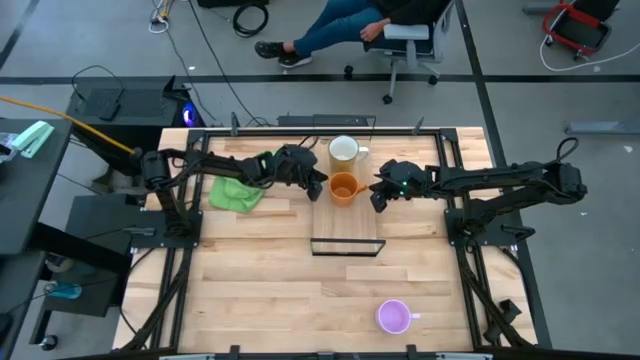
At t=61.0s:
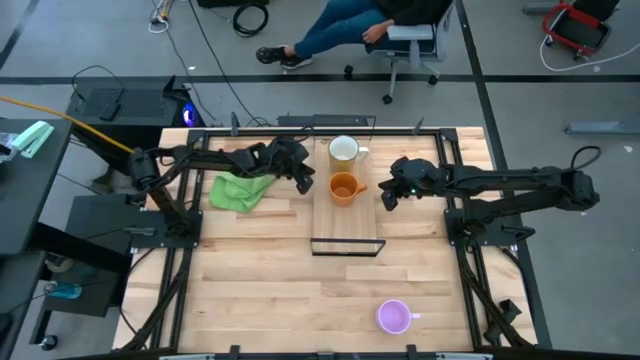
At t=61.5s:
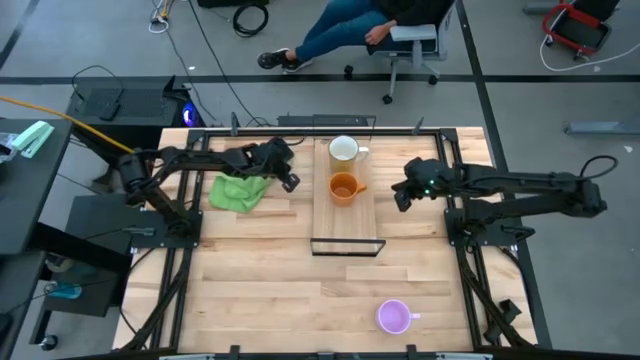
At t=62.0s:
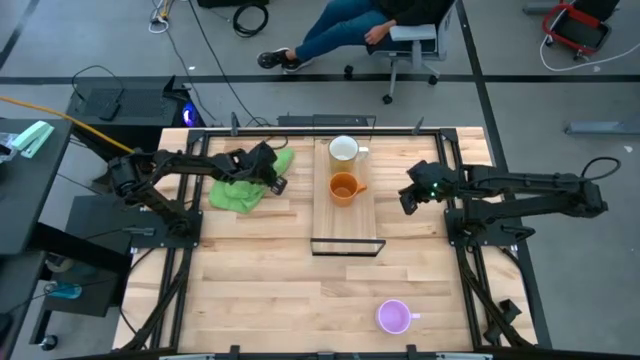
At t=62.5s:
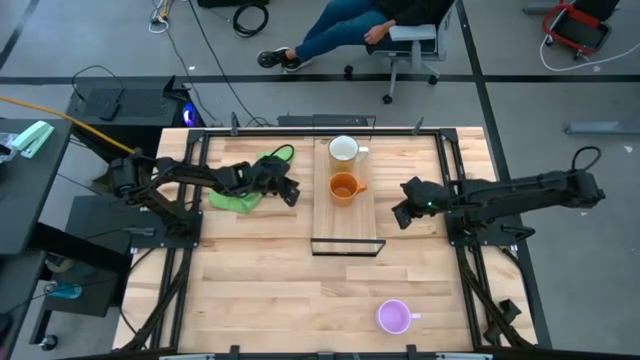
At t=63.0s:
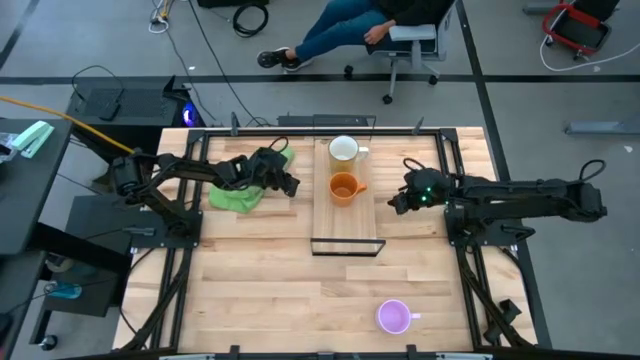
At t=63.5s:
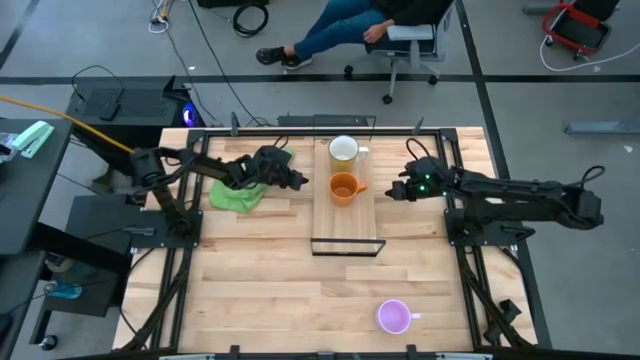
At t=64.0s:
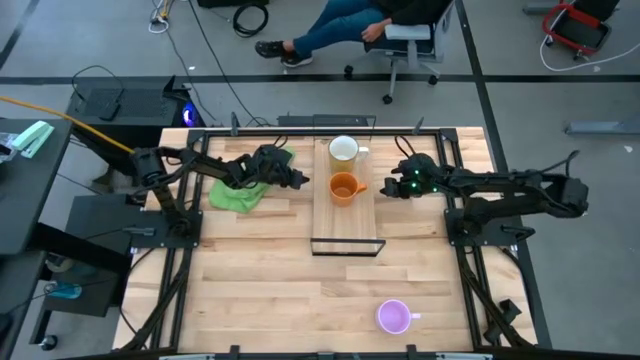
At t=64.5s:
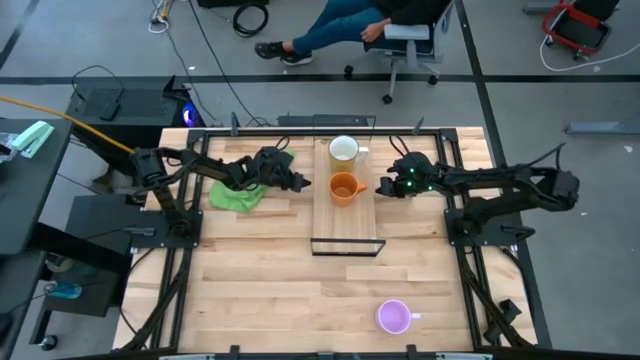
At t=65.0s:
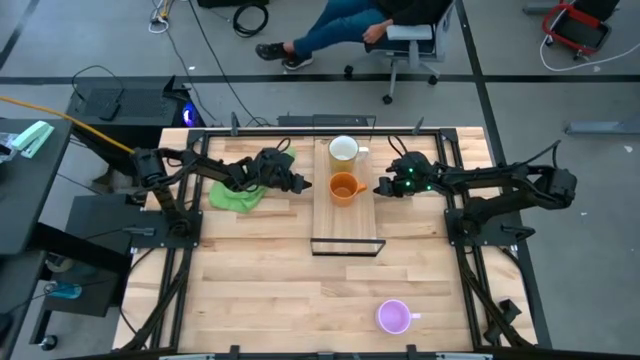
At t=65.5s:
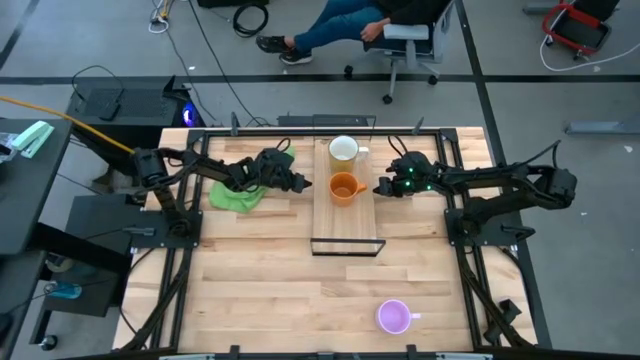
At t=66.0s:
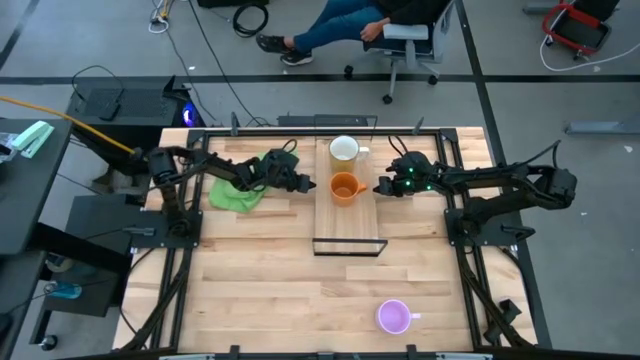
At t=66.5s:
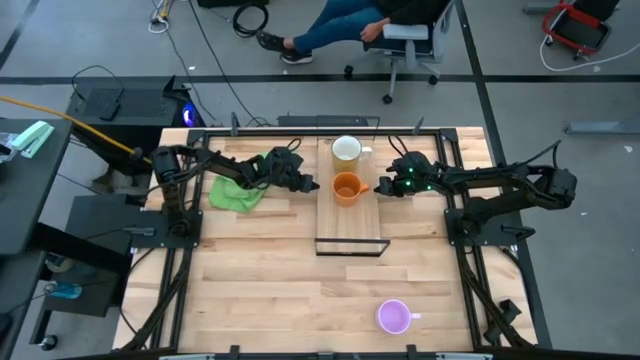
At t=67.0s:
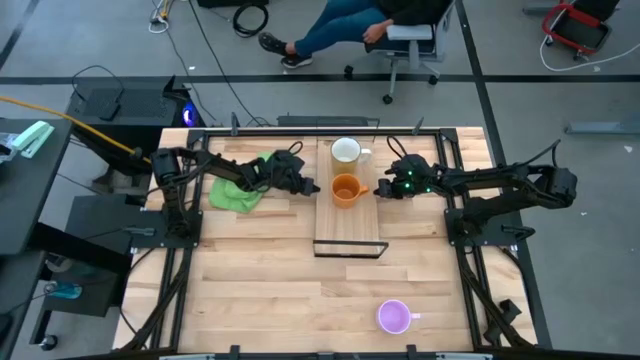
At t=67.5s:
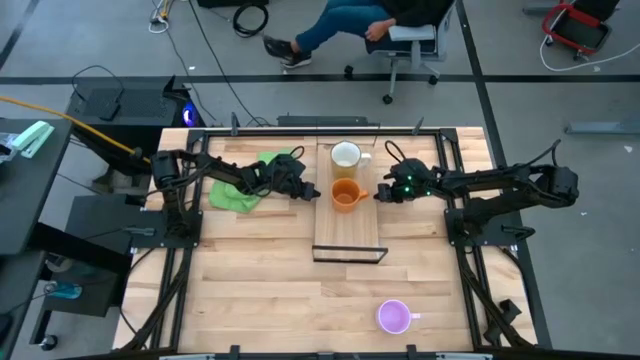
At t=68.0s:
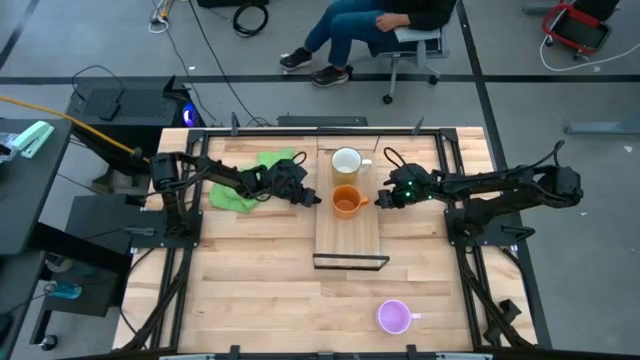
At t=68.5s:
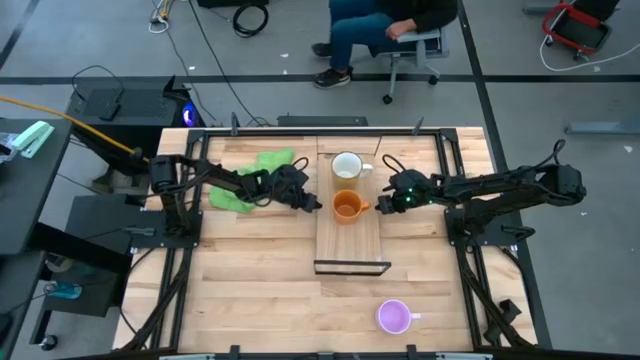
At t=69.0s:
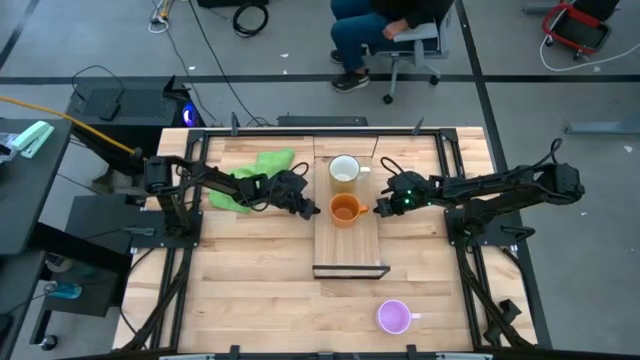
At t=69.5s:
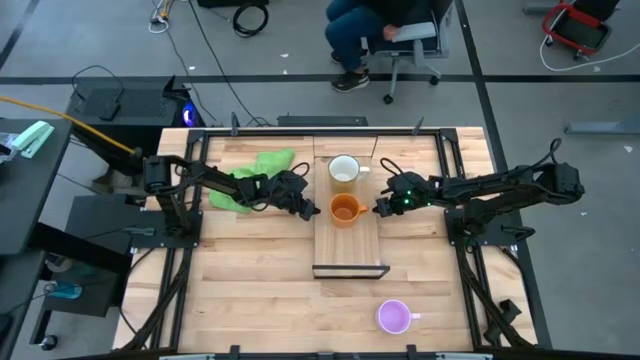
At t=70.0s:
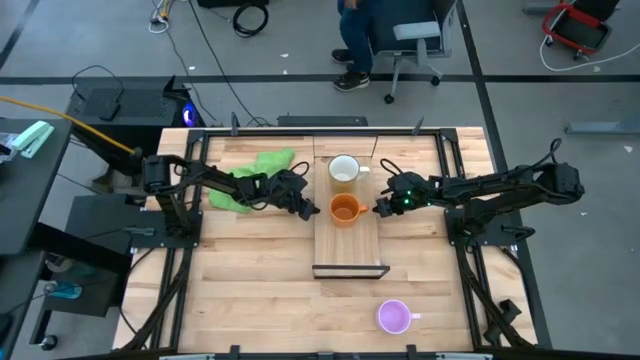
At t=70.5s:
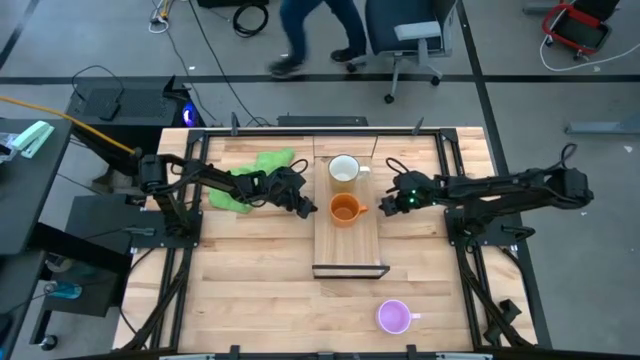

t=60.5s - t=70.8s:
Task: Stack small to large cups/mugs on shelf
Adjust the shelf

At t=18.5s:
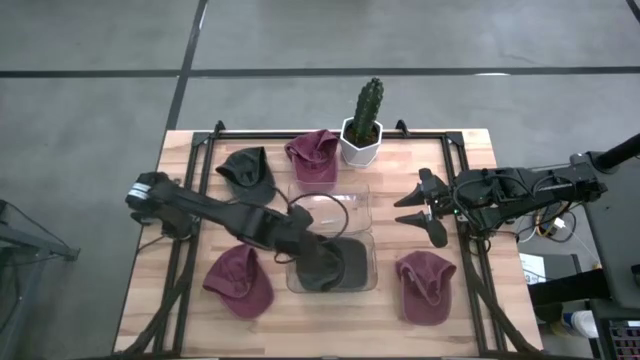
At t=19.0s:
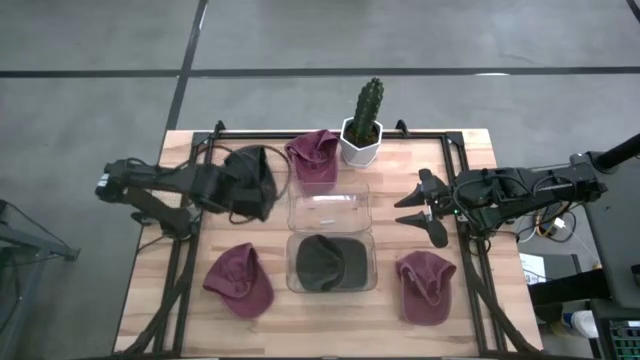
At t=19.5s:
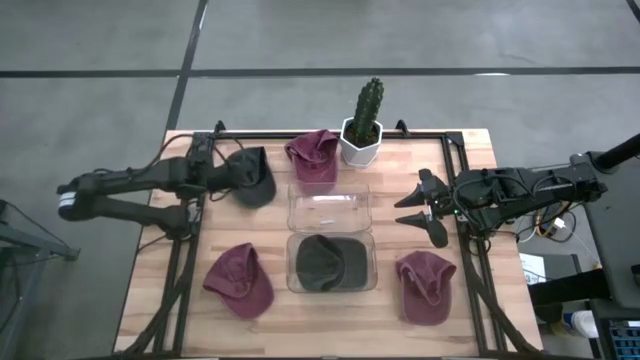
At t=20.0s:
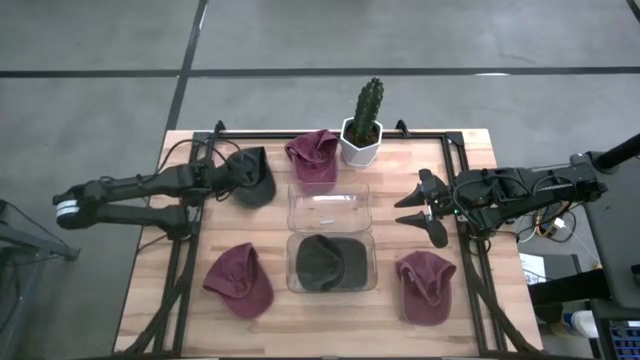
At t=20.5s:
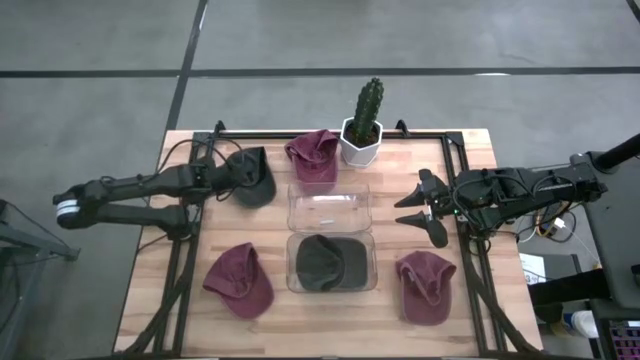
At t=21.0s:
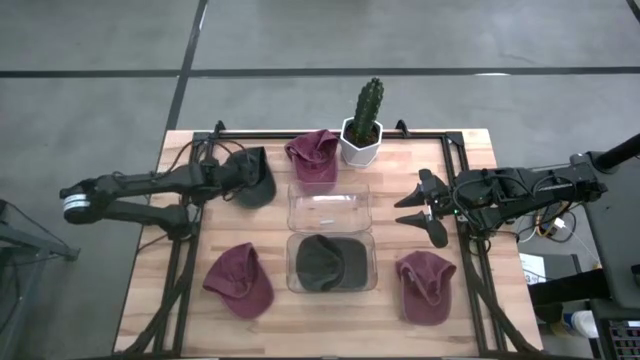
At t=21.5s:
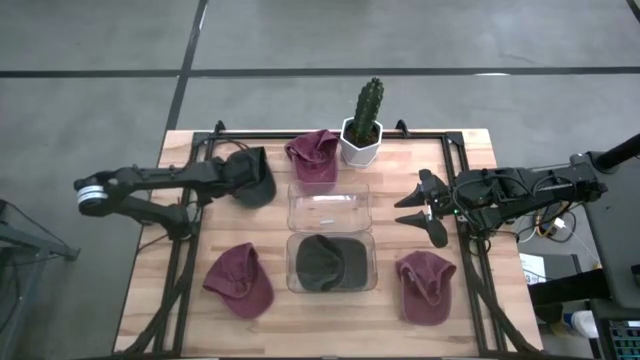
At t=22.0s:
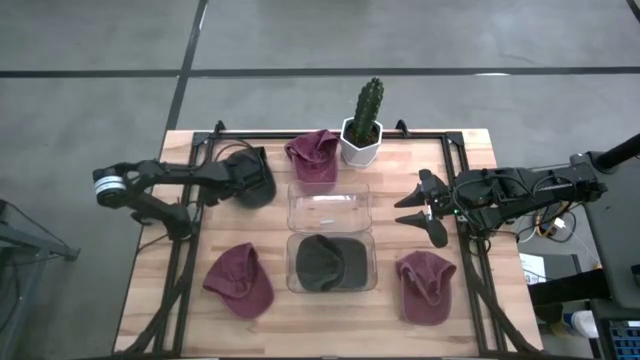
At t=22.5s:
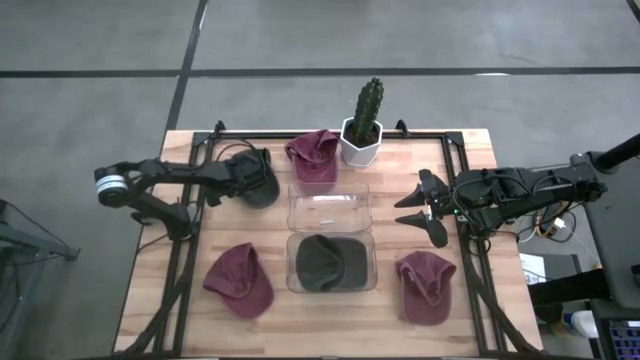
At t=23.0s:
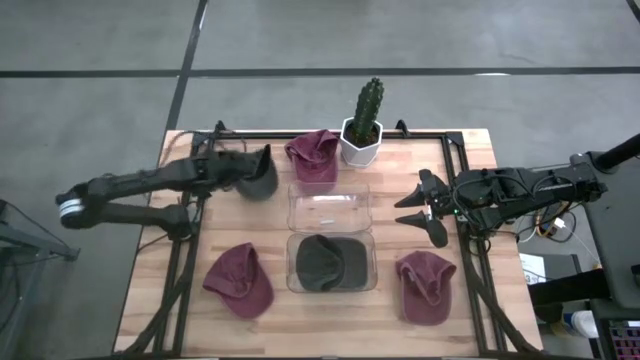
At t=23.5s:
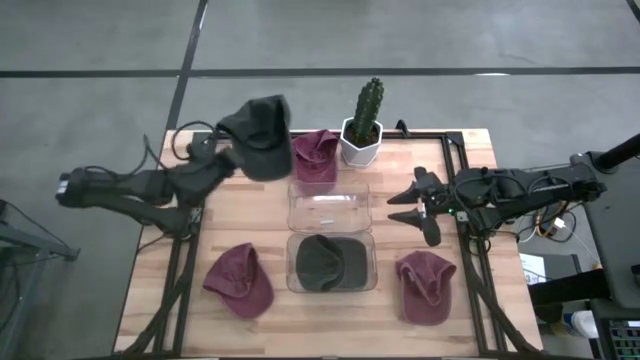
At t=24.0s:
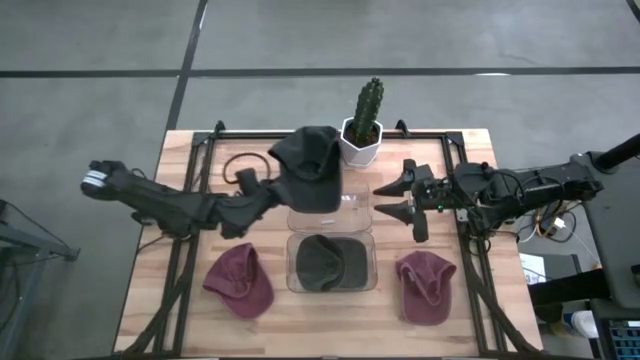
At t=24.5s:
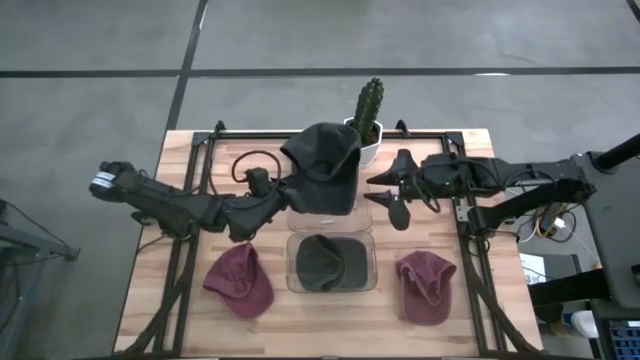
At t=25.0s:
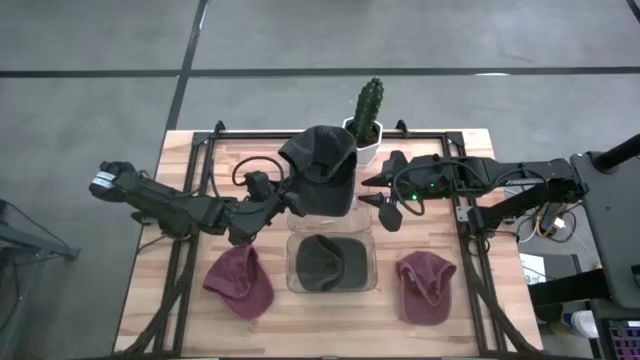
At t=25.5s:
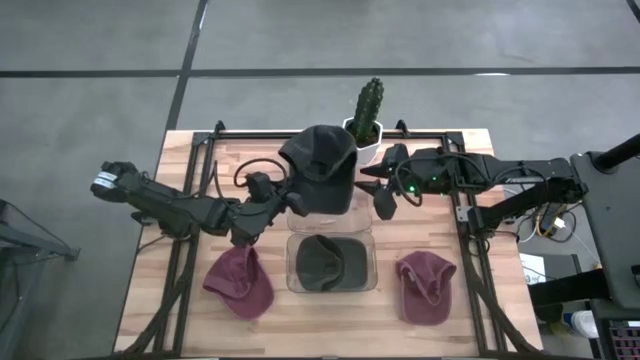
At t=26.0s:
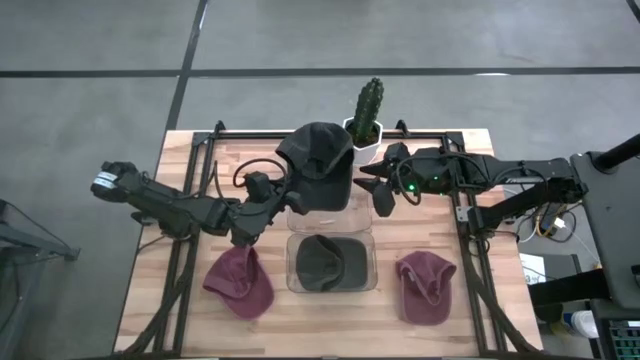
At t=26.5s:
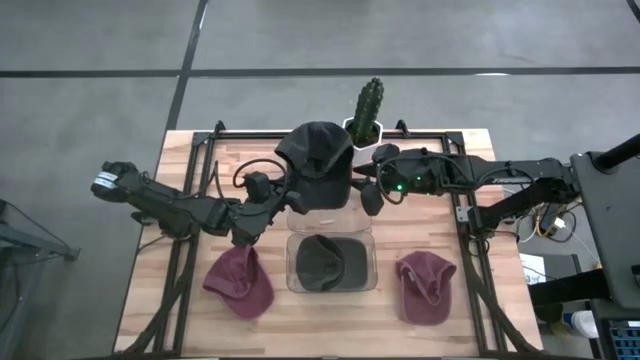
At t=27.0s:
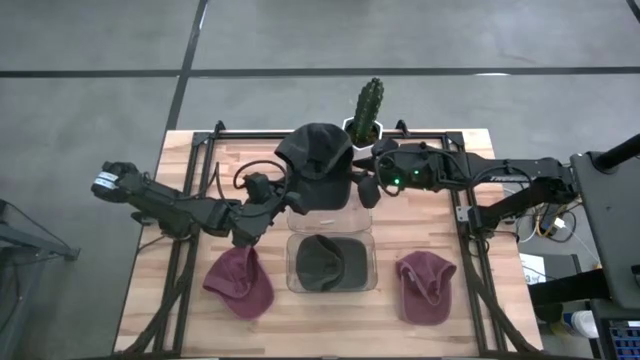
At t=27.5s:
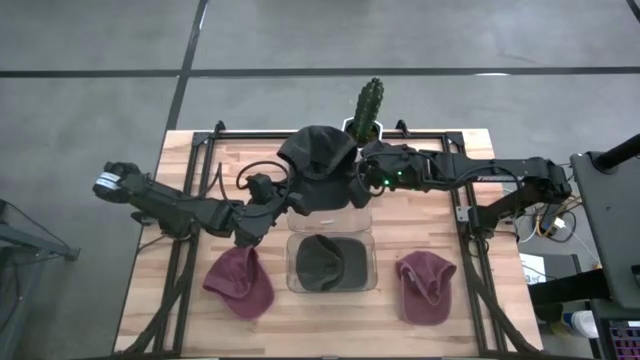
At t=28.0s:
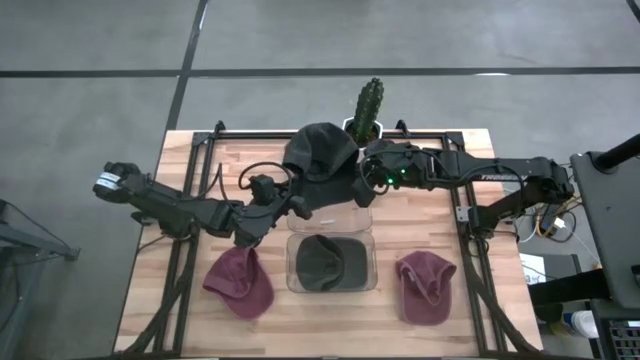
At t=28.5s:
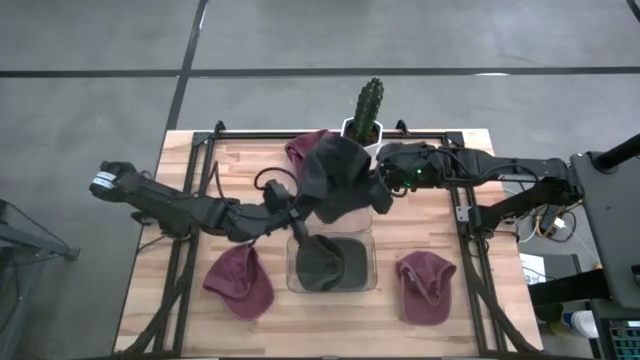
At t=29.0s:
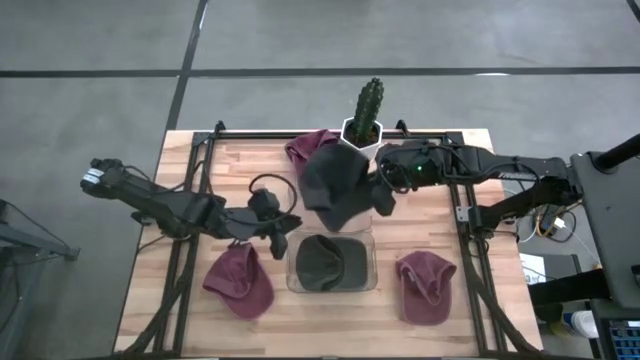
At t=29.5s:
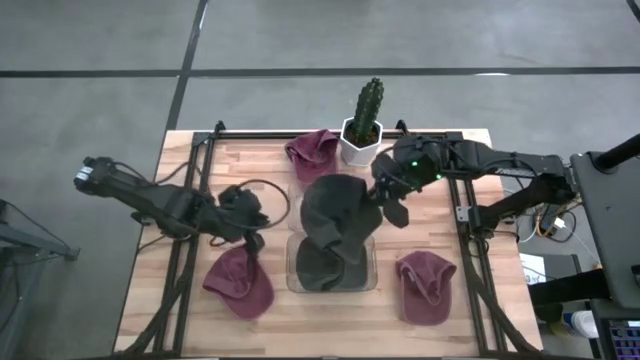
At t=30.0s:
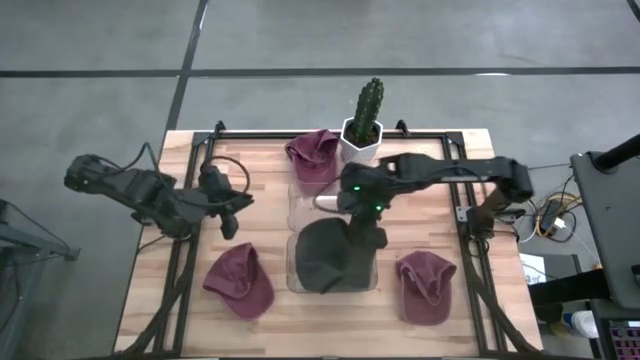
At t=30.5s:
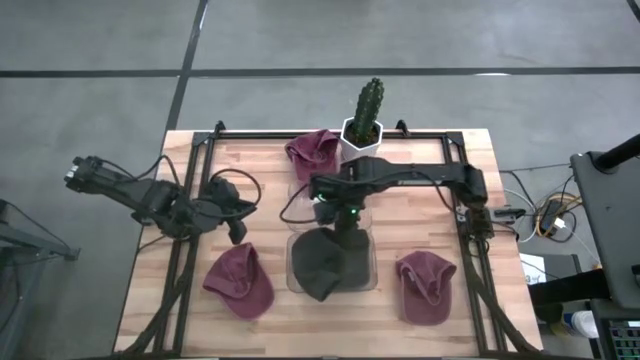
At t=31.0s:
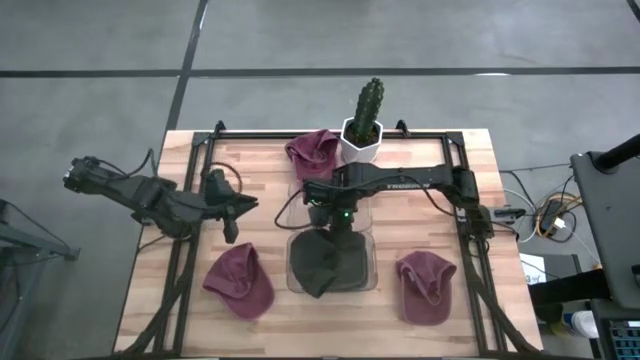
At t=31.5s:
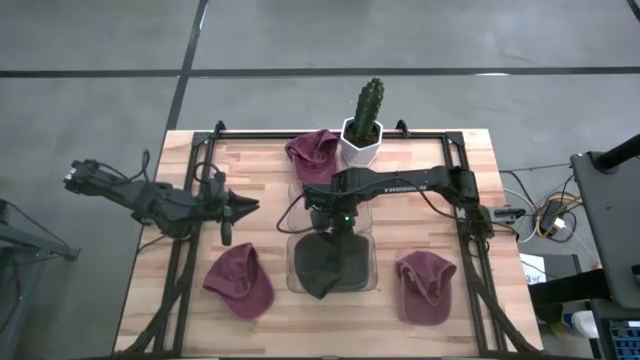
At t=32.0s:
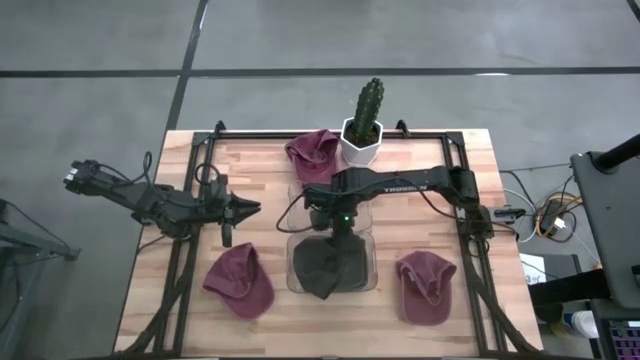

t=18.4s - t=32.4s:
Task: Pick & Place hat
Put the black cap into the bottom transparent bin
